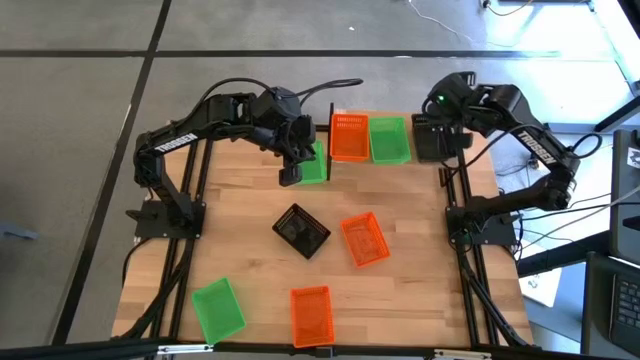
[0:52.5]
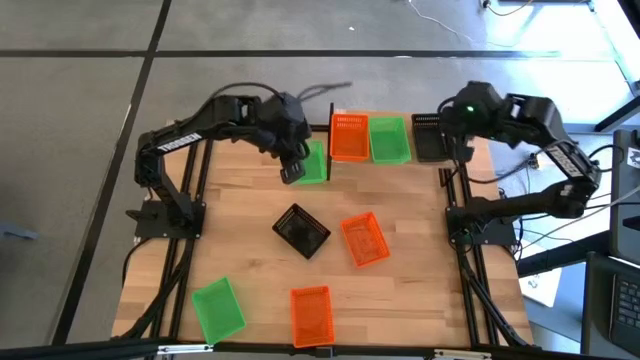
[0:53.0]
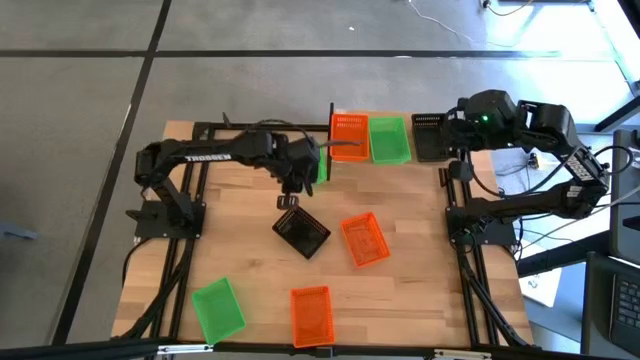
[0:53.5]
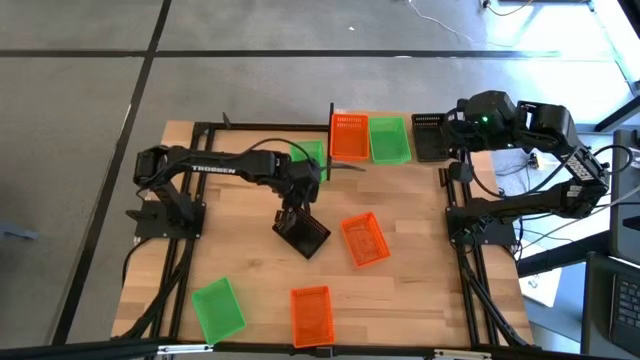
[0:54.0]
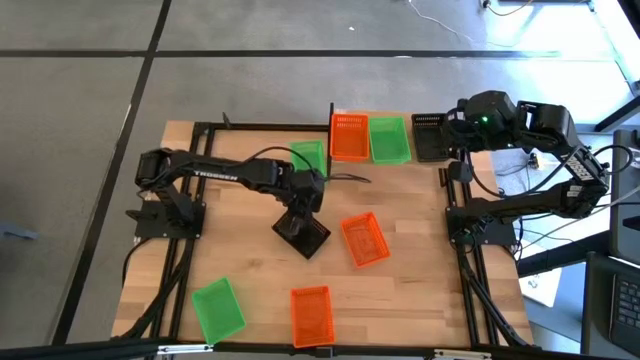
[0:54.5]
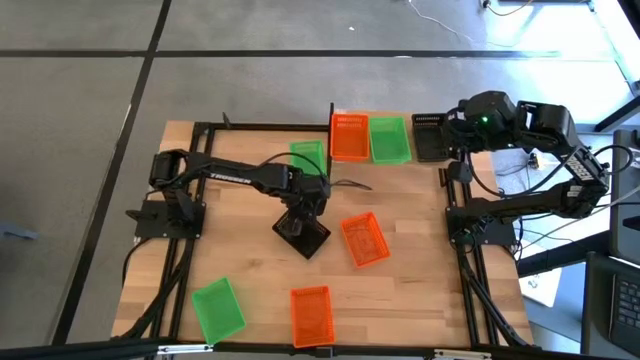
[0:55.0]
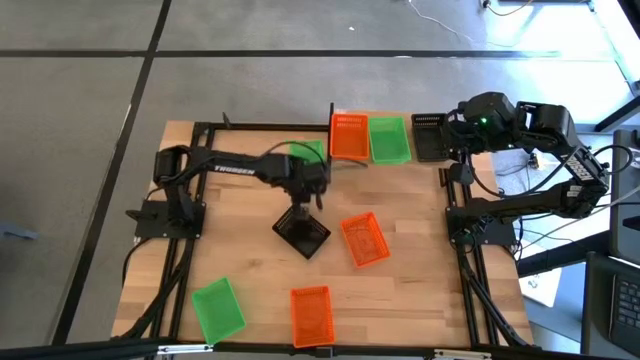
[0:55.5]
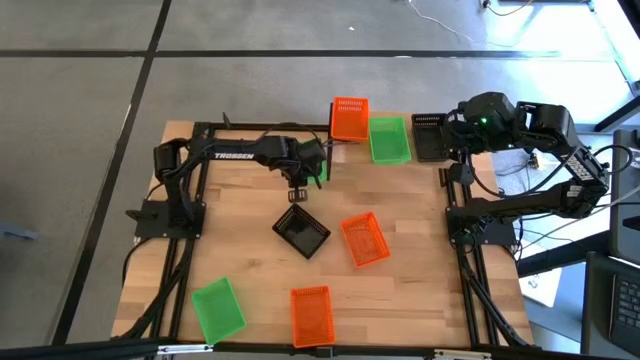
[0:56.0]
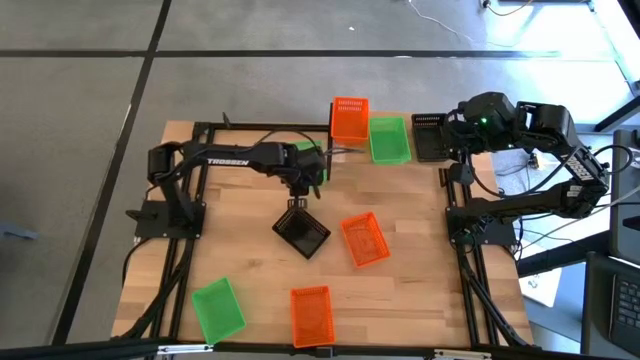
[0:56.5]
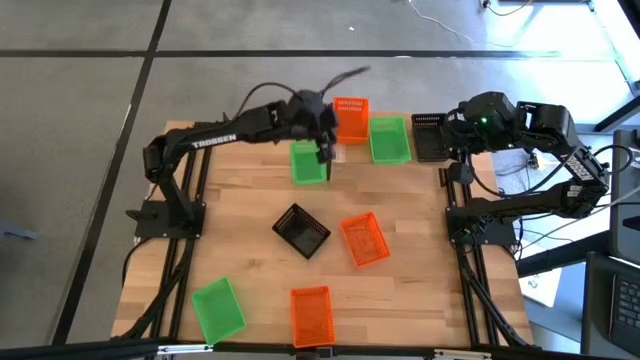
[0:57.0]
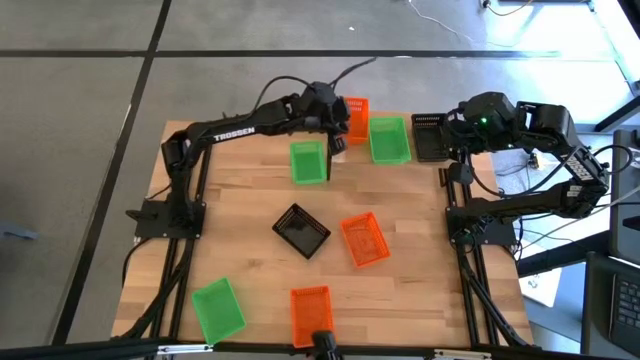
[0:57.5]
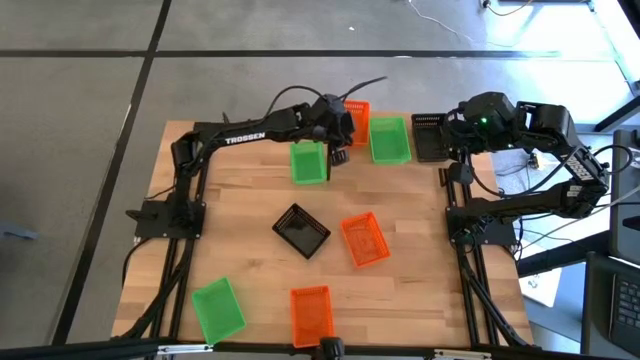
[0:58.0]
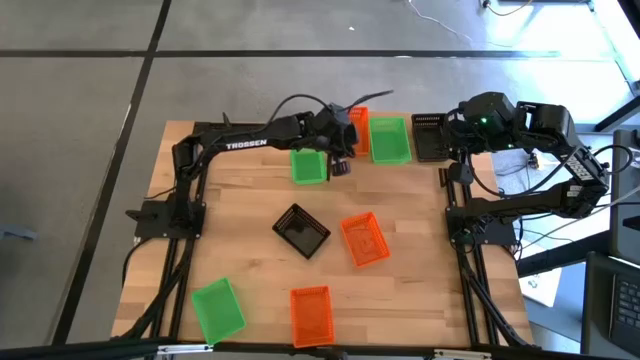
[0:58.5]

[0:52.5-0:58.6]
Task: Stack baskets on shelf by color
Adjust the orange bin on the shelf

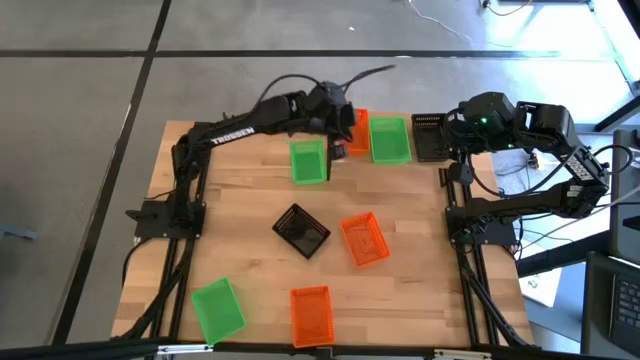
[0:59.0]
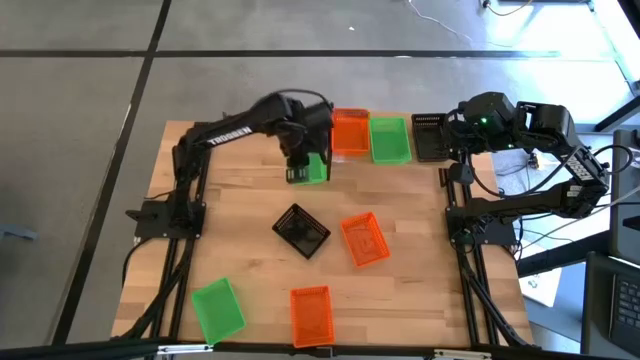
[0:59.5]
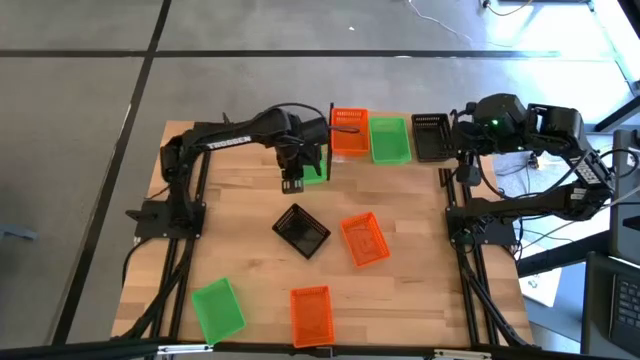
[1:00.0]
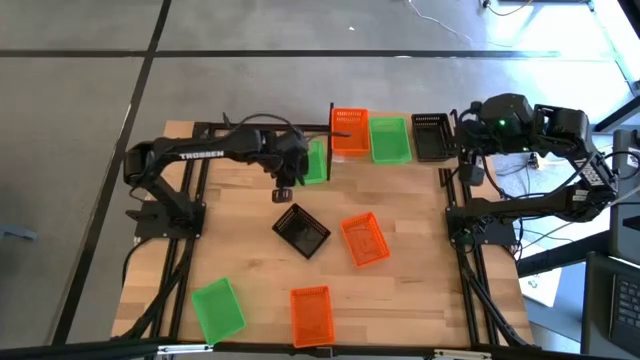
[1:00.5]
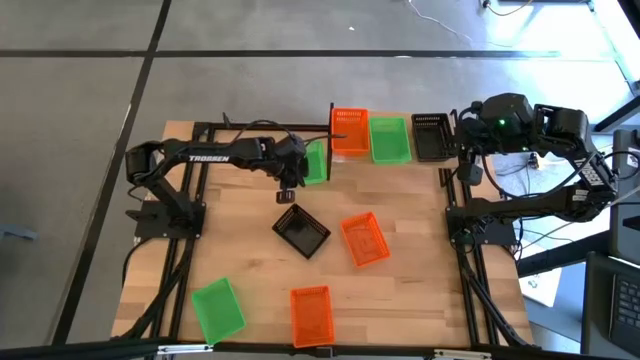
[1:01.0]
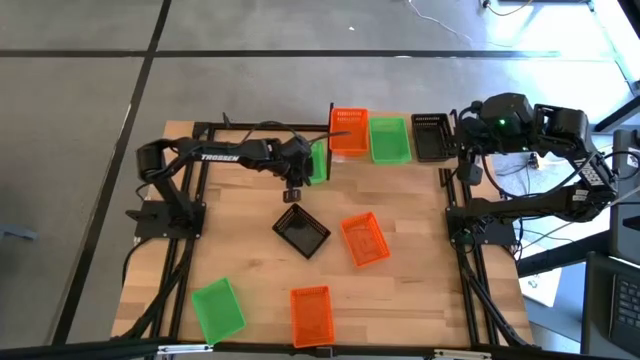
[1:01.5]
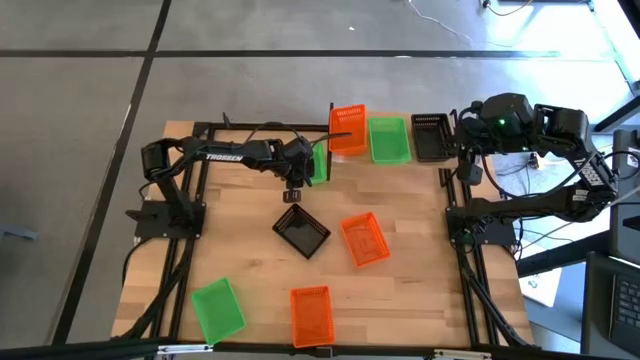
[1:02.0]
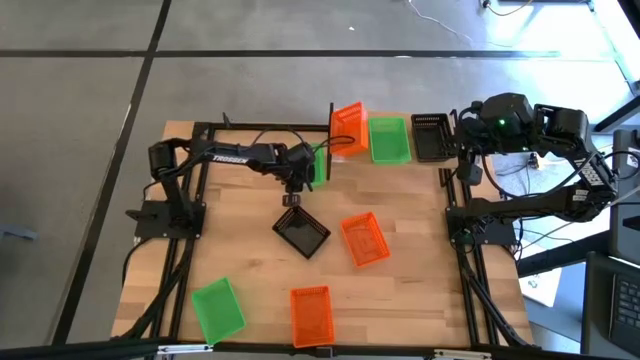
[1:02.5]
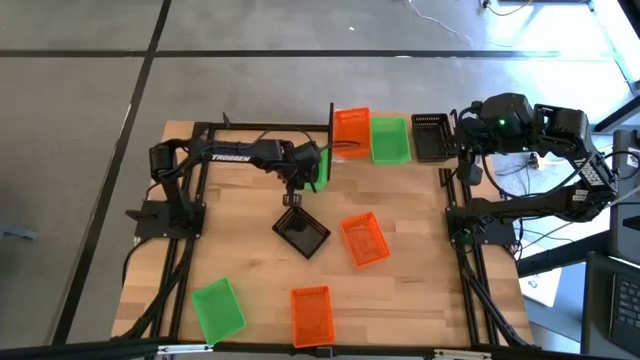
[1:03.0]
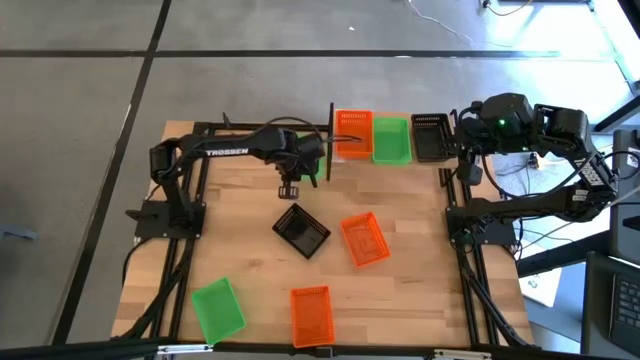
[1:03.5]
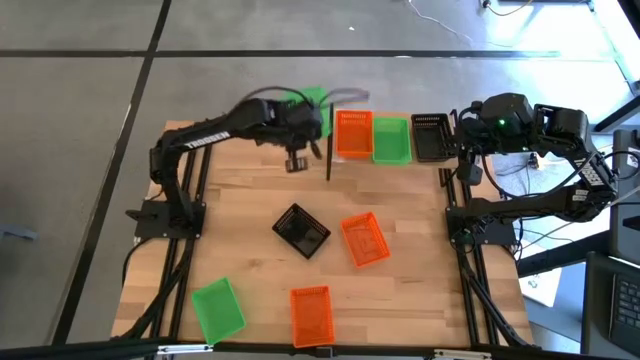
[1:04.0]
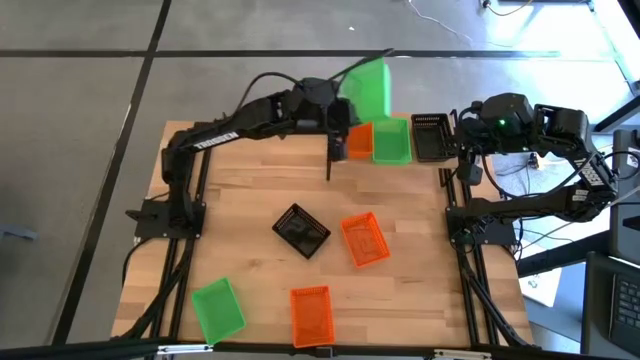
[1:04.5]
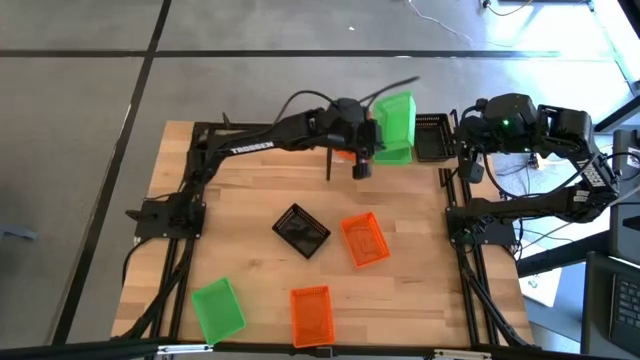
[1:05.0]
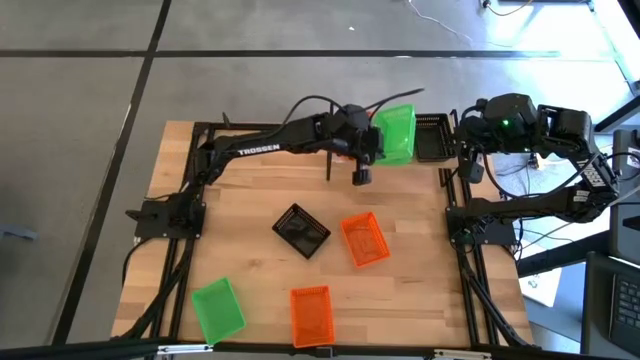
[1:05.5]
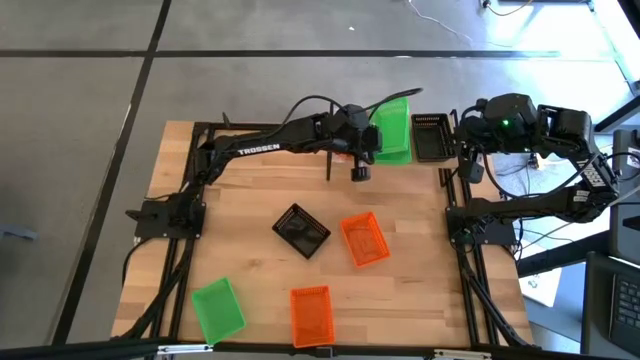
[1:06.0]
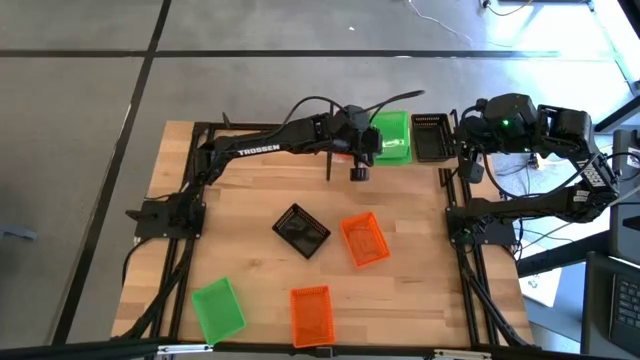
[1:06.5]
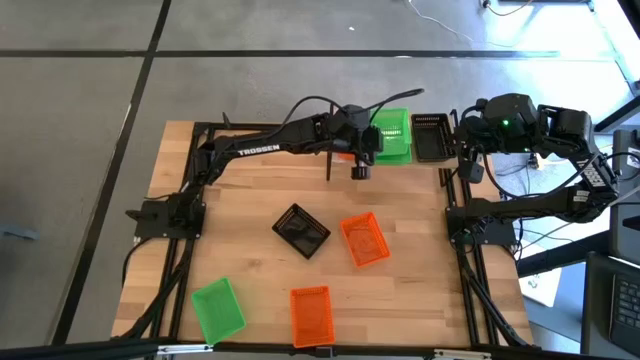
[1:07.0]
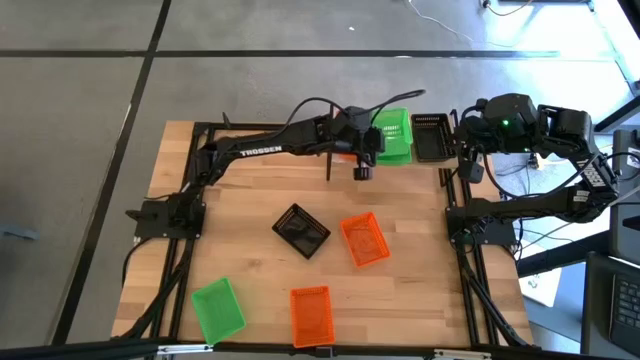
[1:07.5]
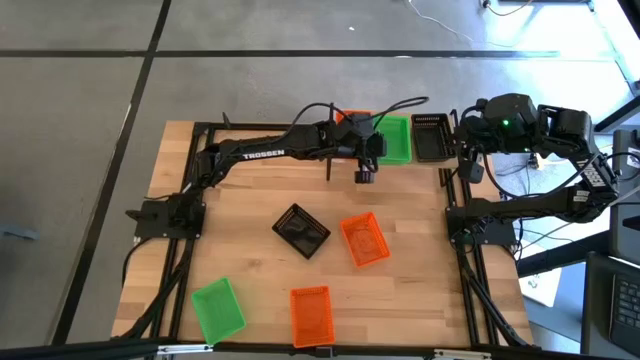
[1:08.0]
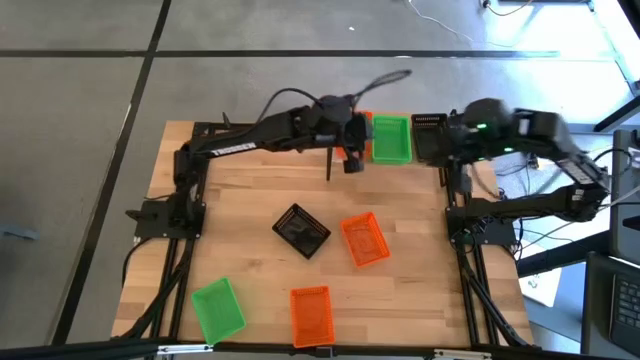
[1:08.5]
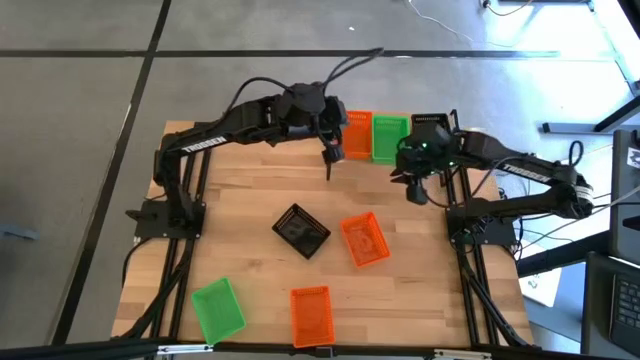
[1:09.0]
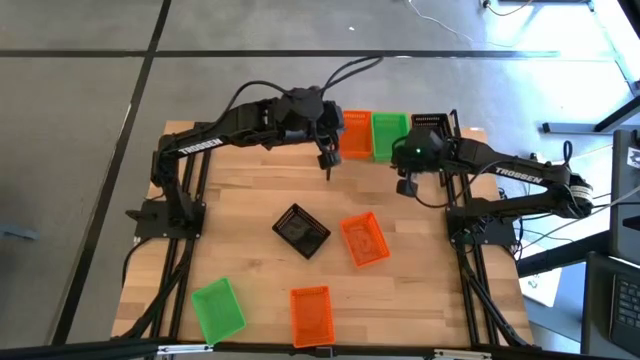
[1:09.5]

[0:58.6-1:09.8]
Stack the top green bin on top of the green bin on the shelf

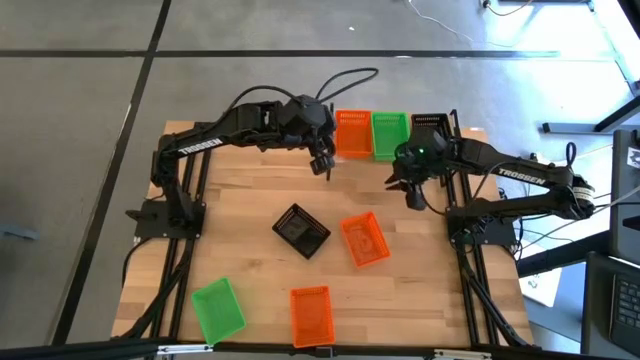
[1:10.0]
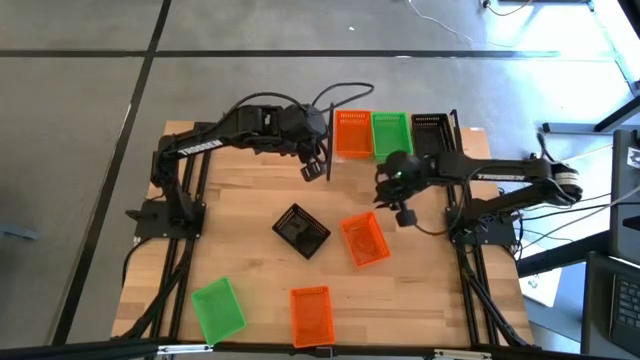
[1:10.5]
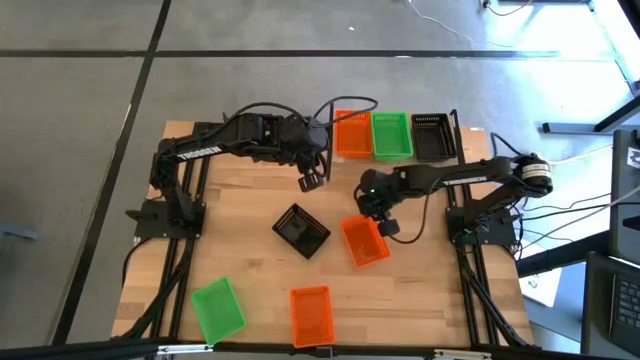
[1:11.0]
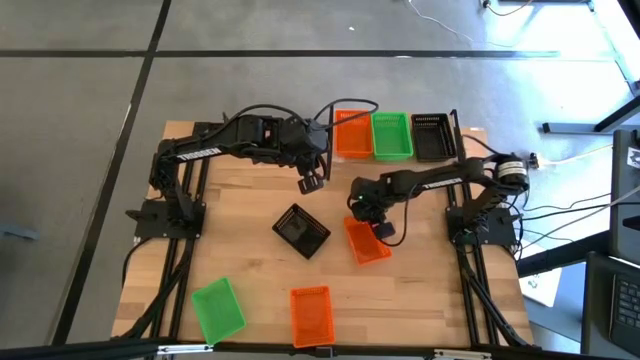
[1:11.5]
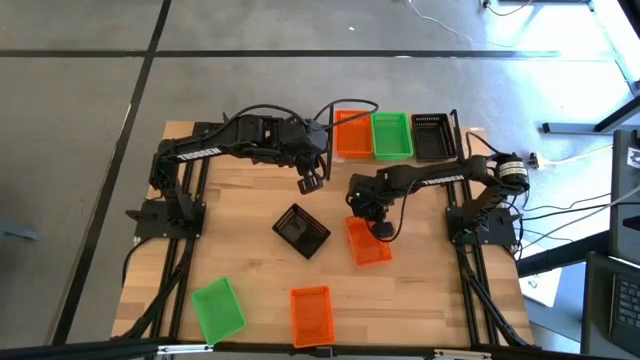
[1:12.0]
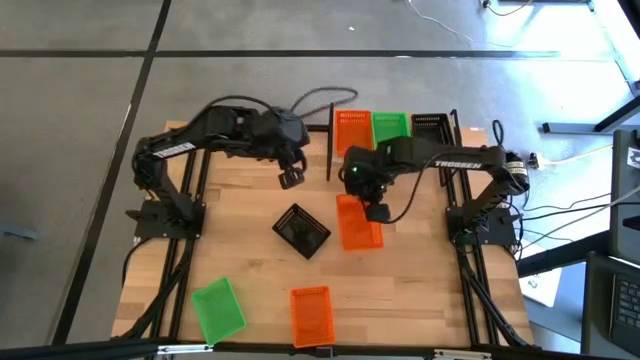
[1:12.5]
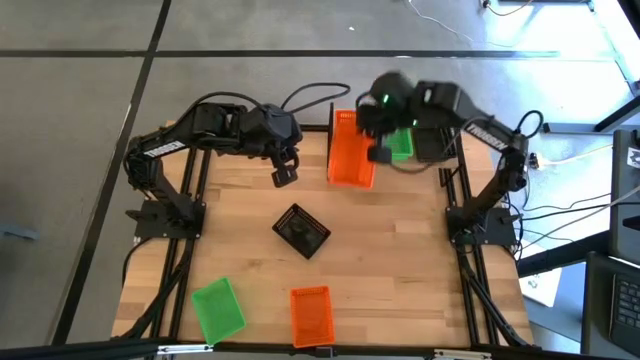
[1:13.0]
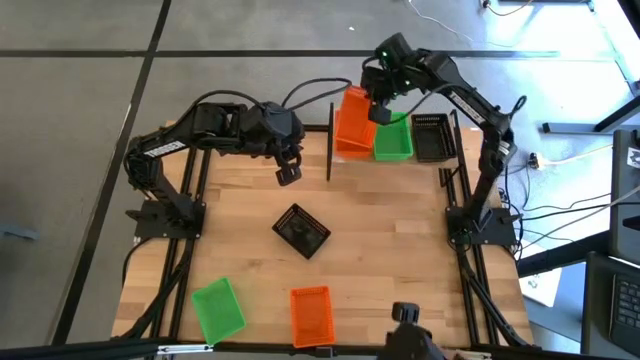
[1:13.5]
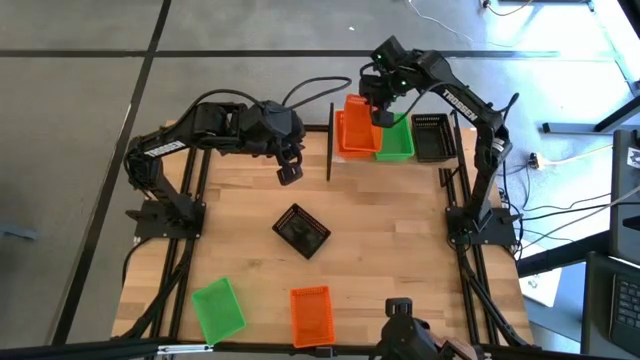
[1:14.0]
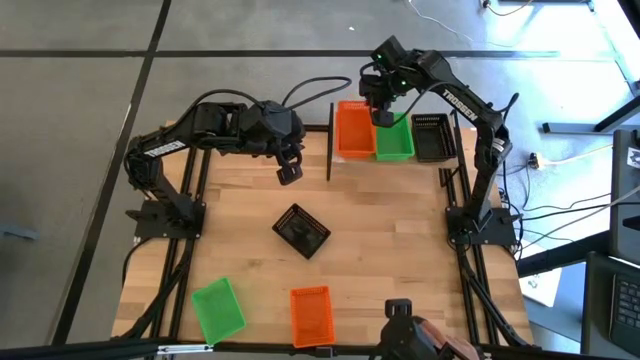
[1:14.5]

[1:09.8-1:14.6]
Stack the top orange bin on top of the orange bin on the shelf
